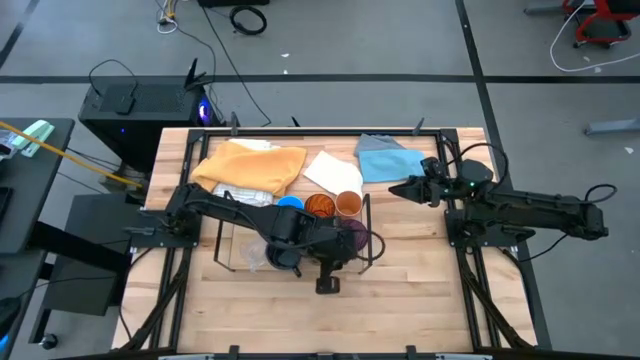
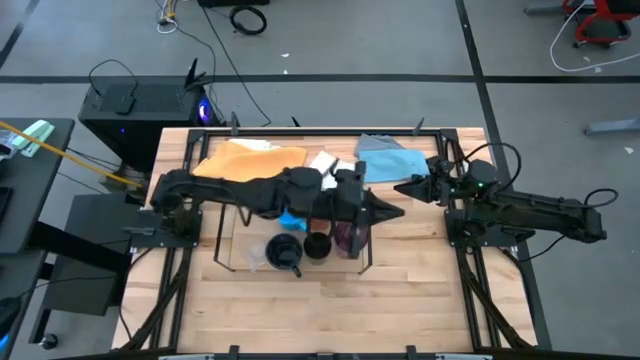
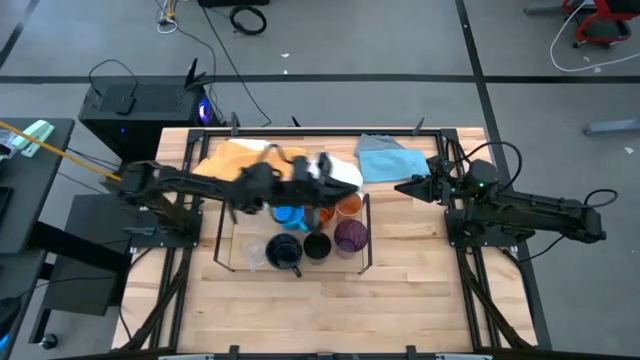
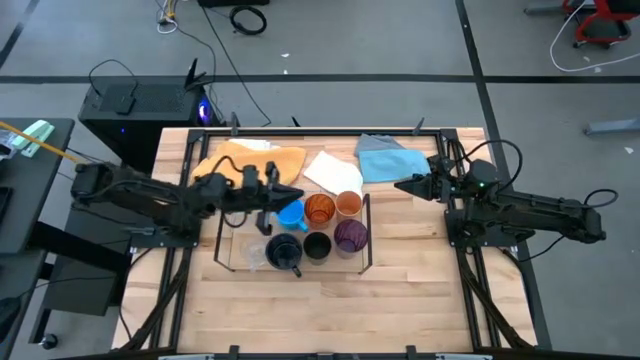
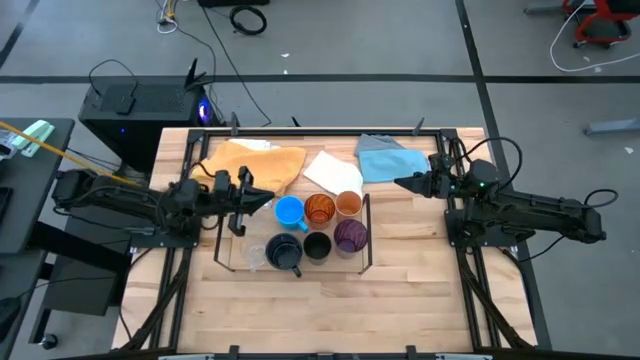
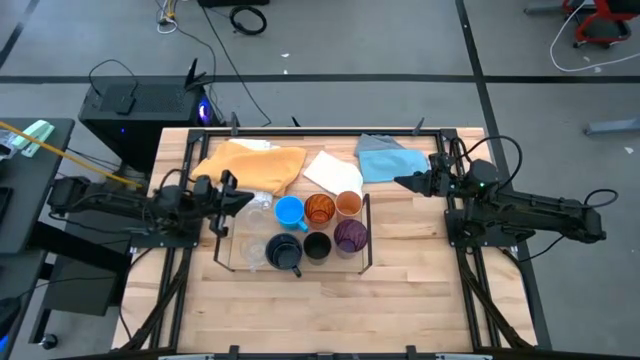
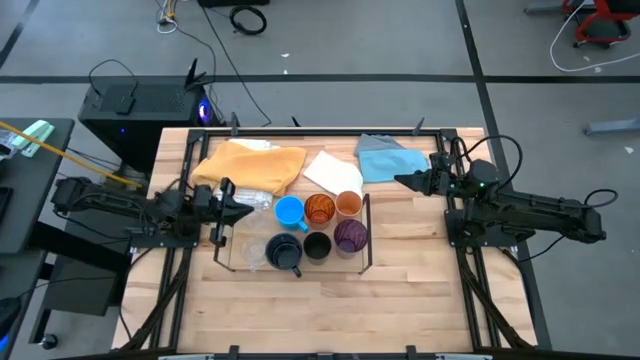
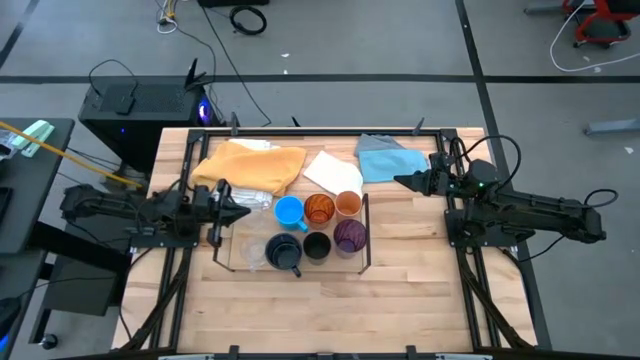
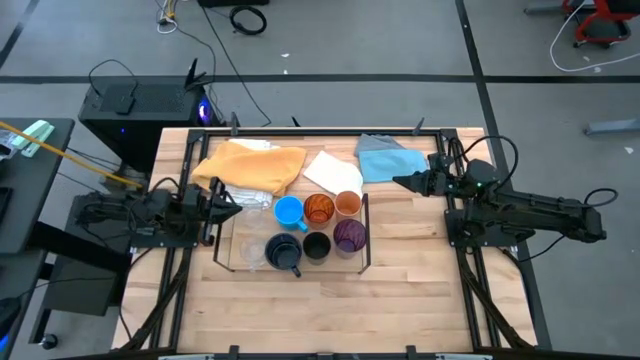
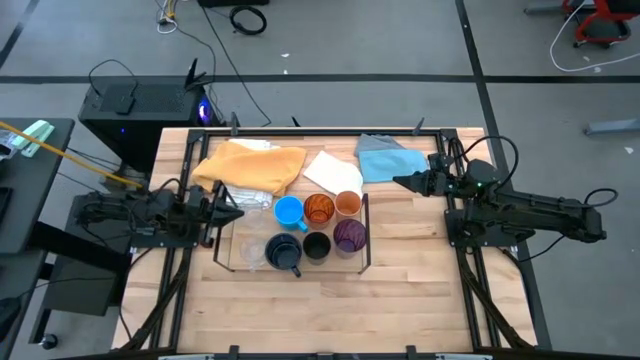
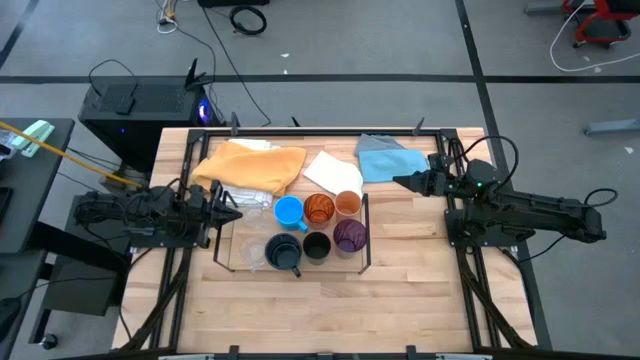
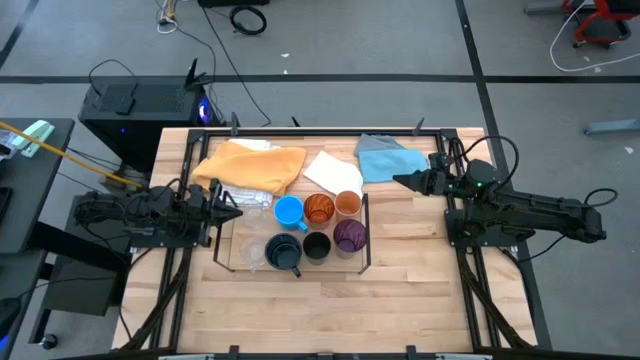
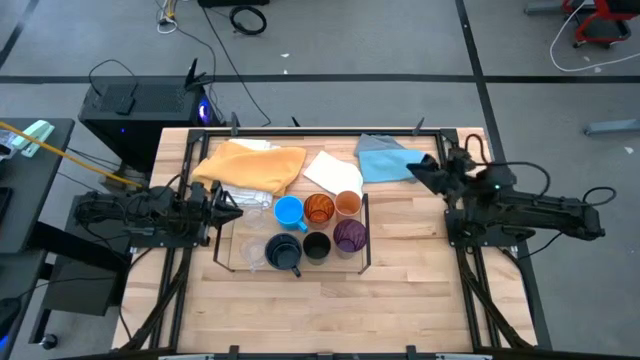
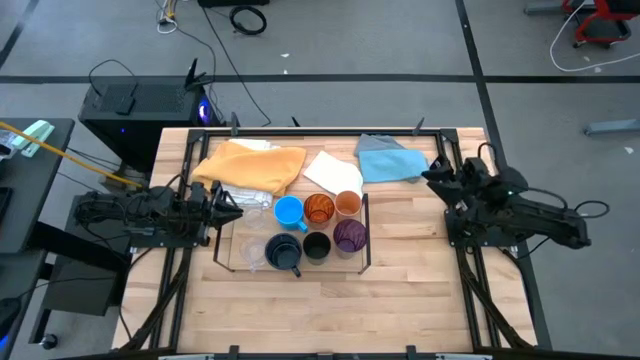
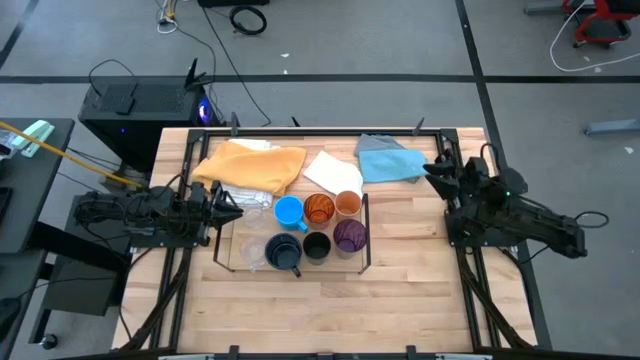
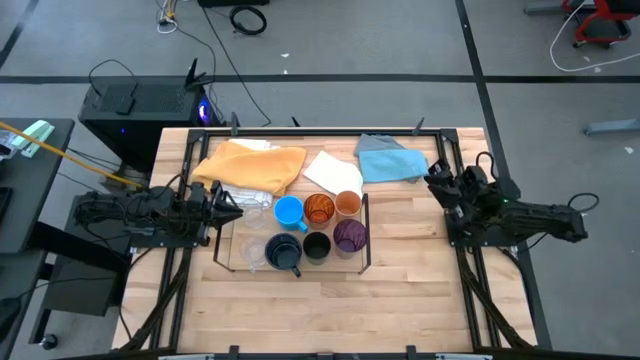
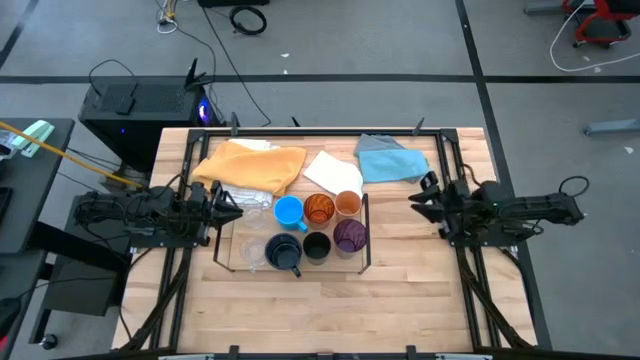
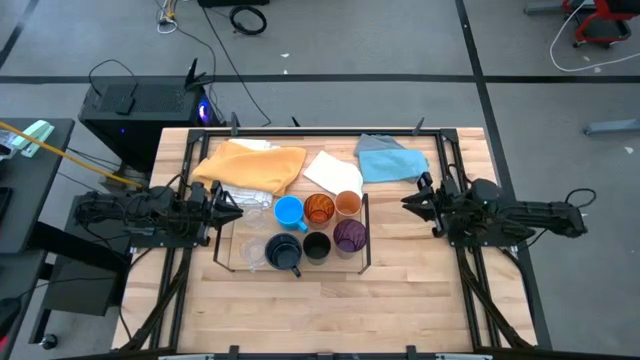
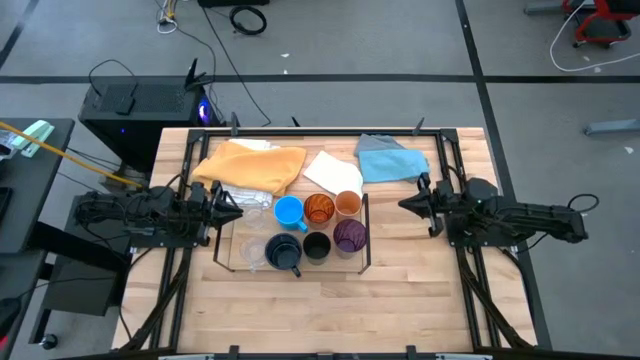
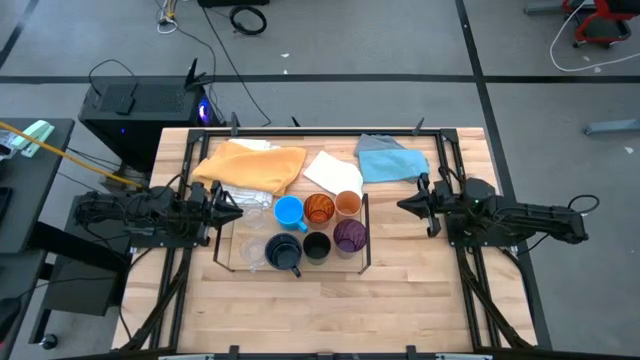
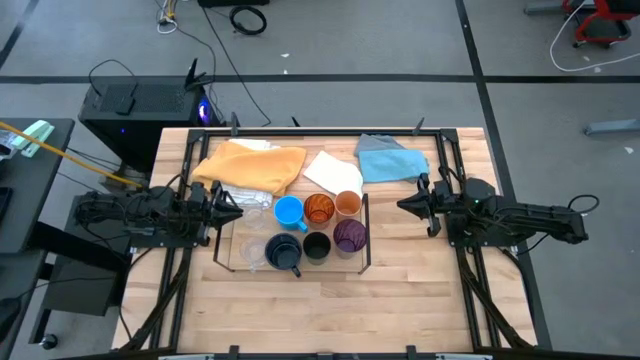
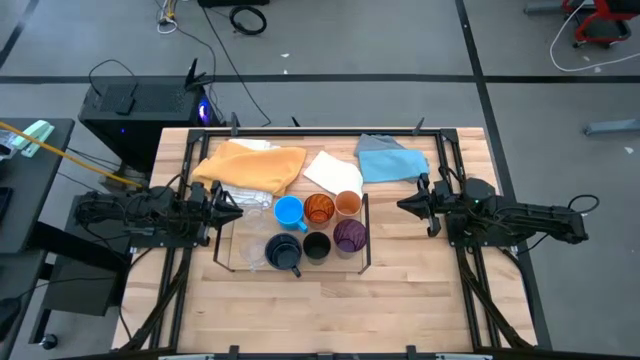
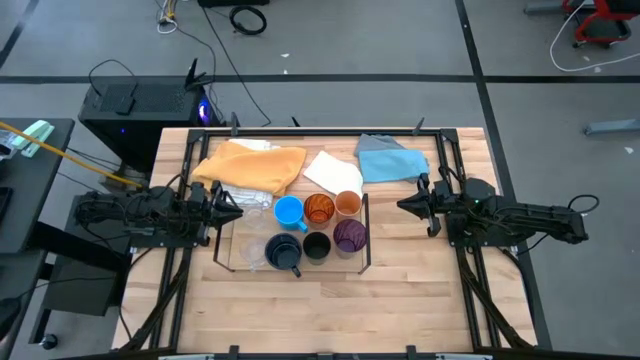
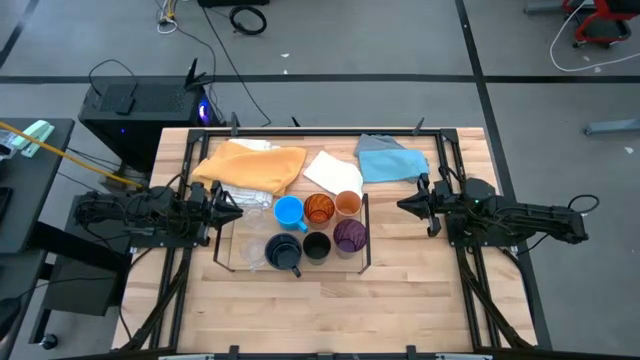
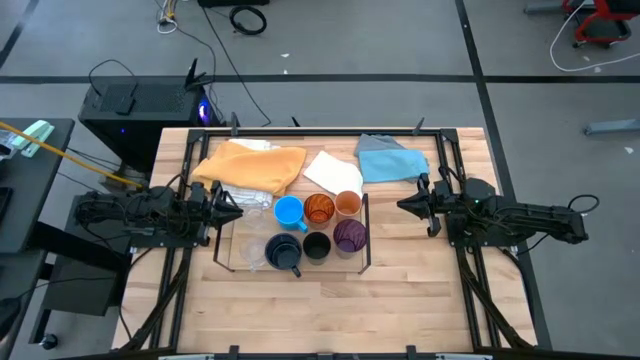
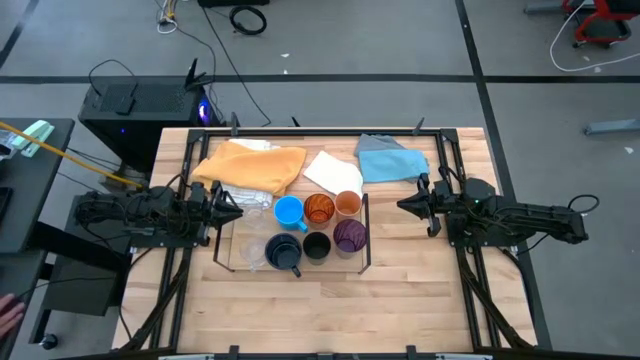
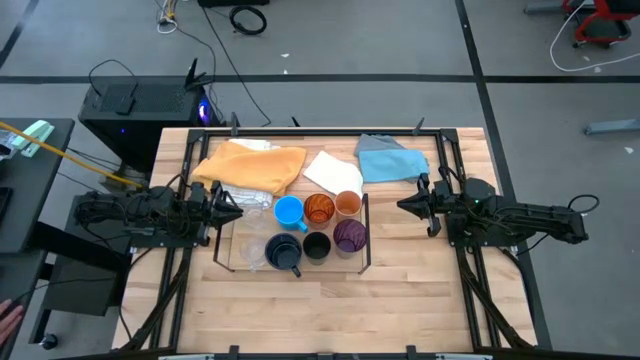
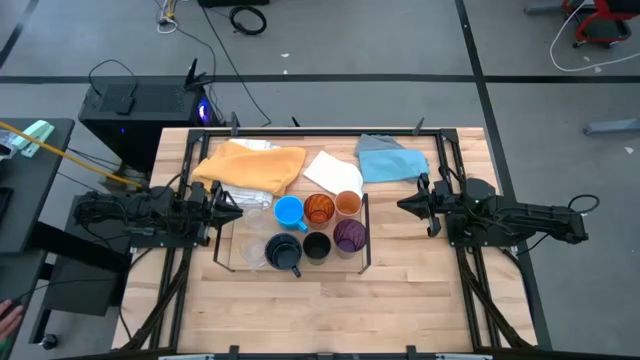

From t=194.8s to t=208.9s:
Task: Stack small to large cups/mugs on shelf
Return to Home Position

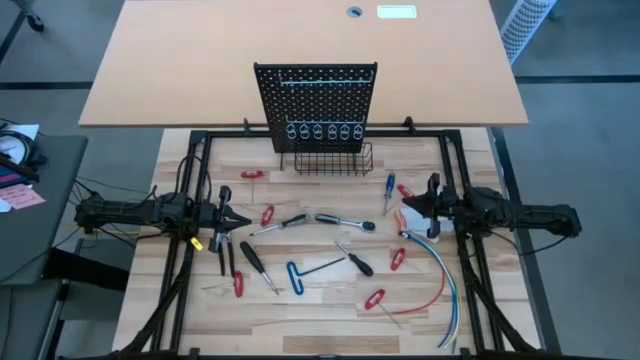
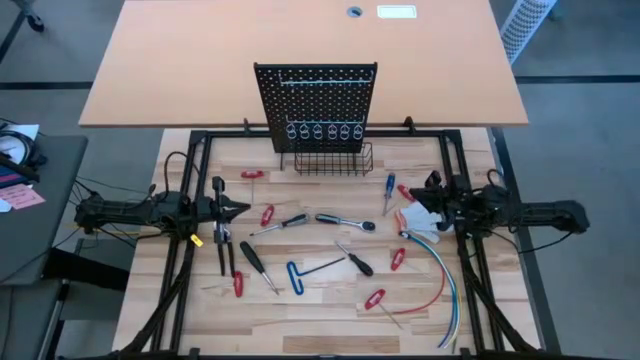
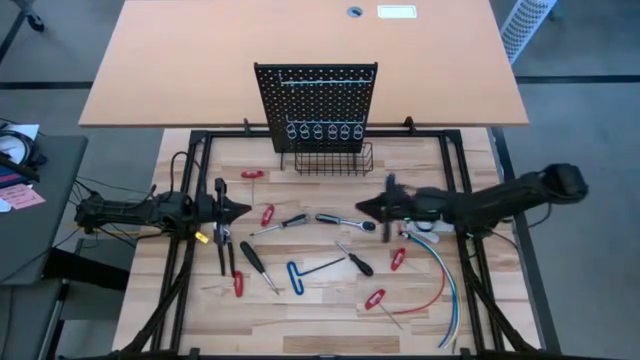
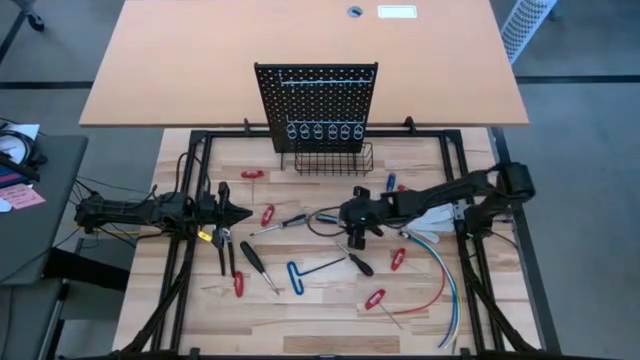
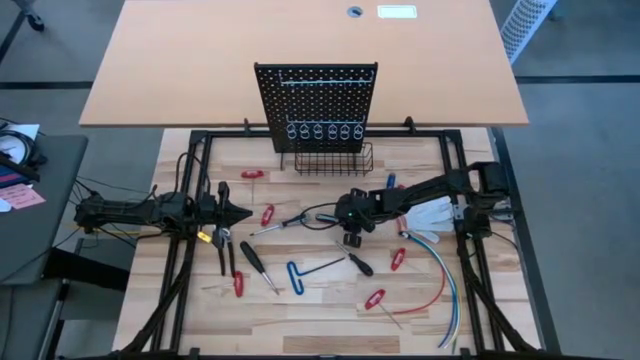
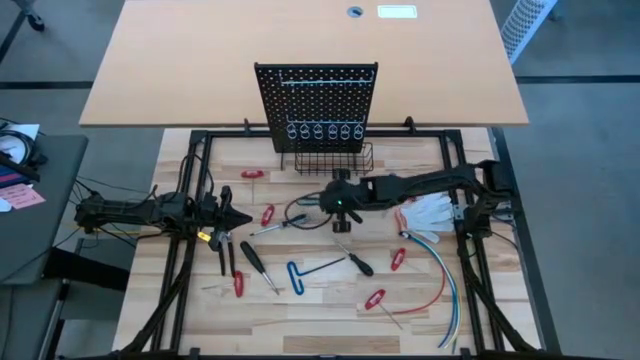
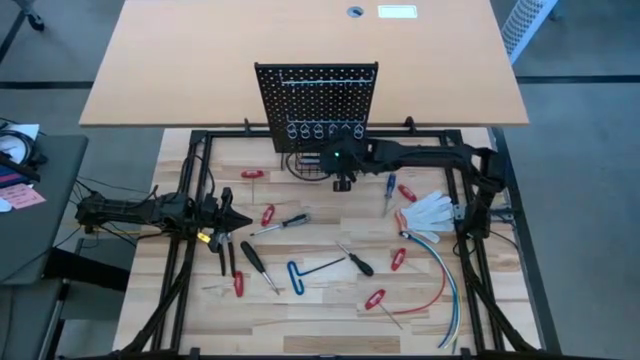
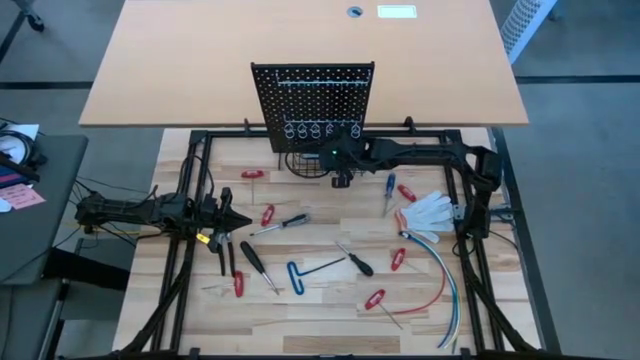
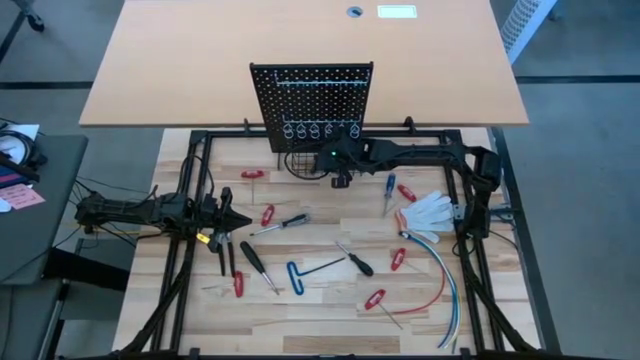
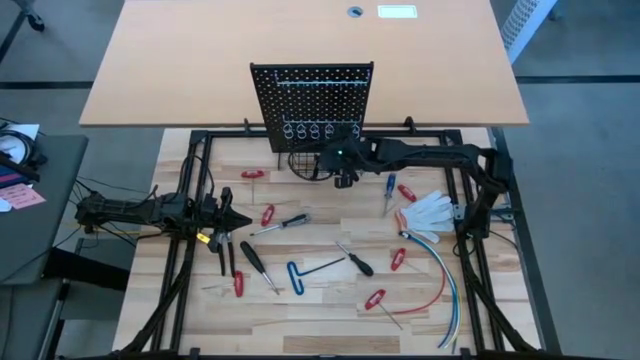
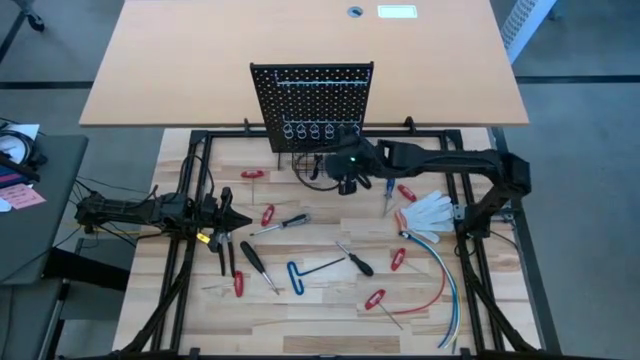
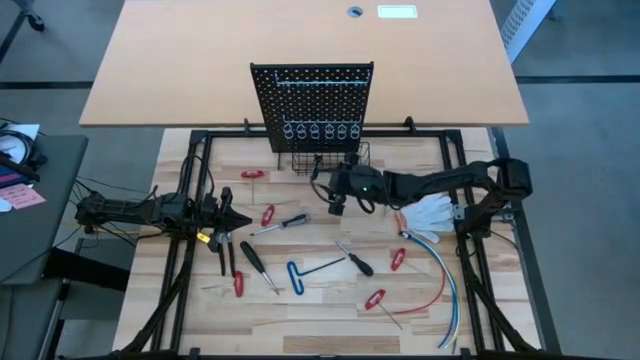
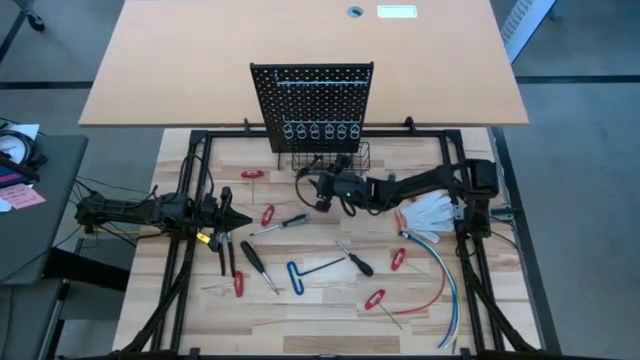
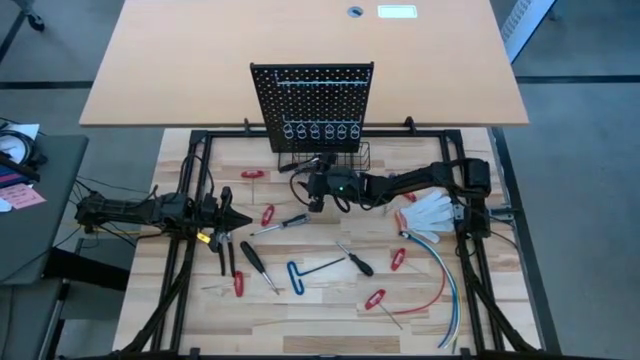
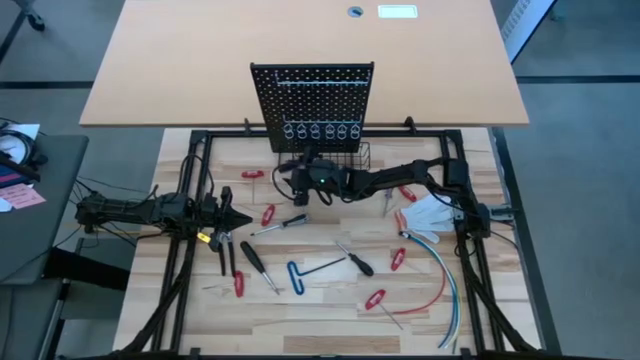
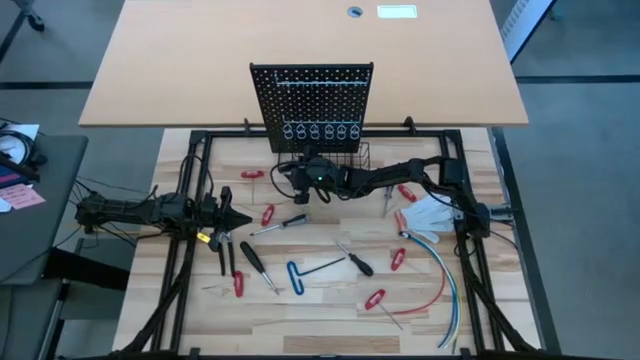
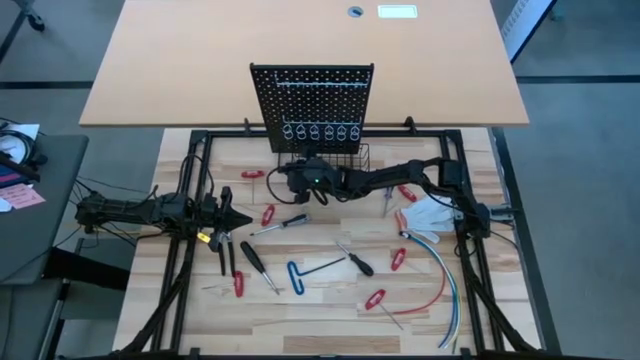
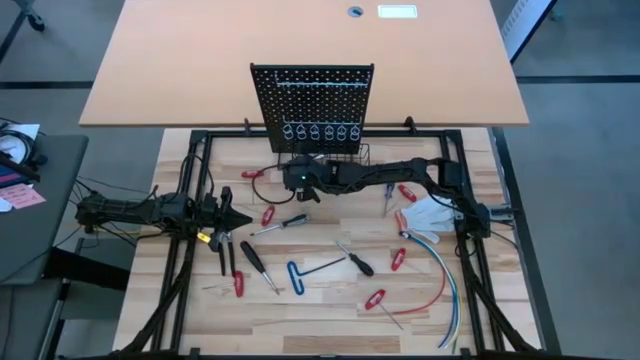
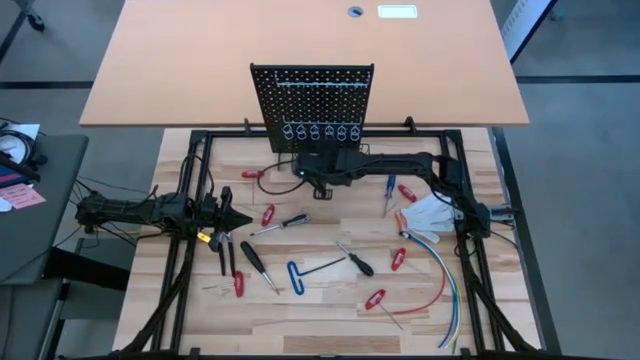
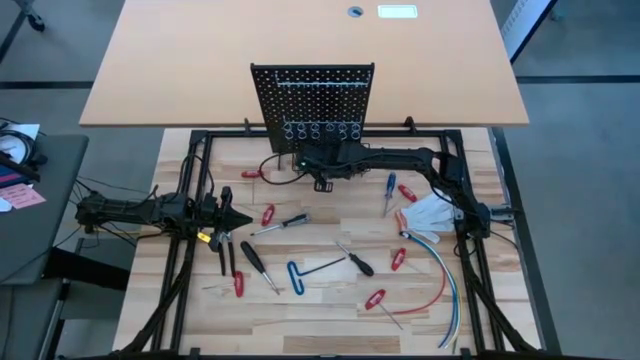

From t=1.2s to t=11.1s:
Task: Hang tools onto peg board
Put the ratchet wrench into the wire basket on the pegboard
